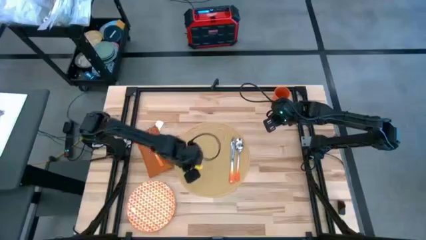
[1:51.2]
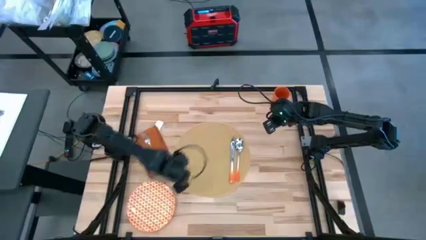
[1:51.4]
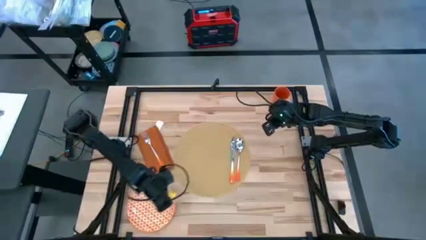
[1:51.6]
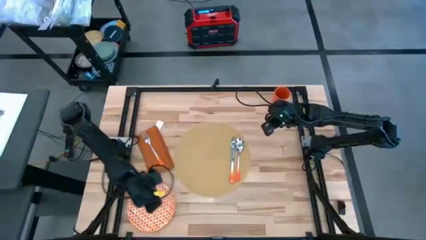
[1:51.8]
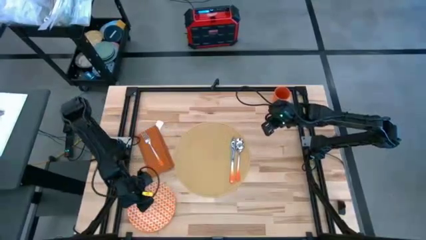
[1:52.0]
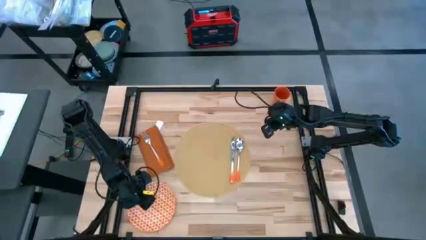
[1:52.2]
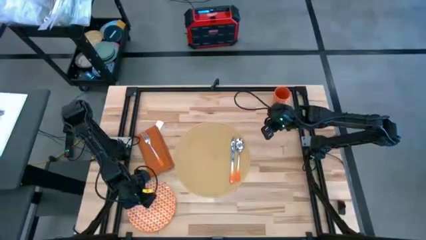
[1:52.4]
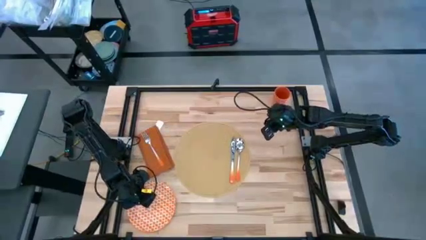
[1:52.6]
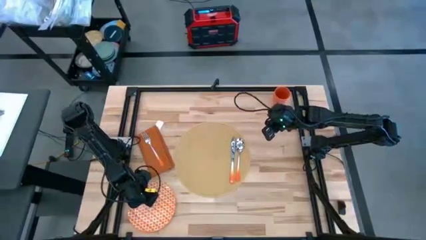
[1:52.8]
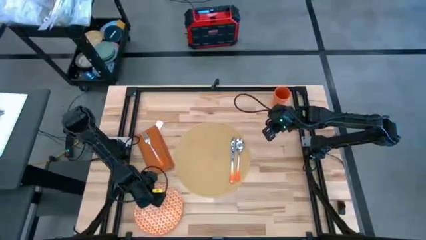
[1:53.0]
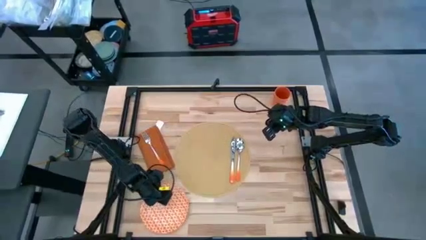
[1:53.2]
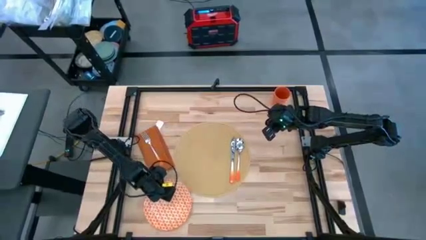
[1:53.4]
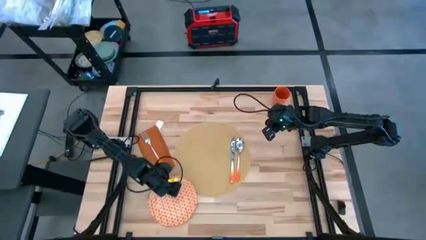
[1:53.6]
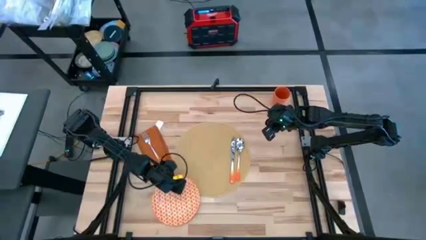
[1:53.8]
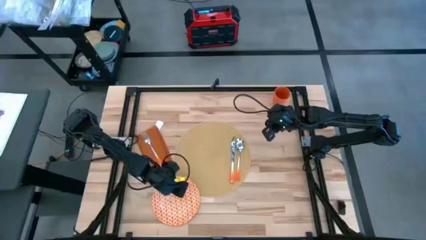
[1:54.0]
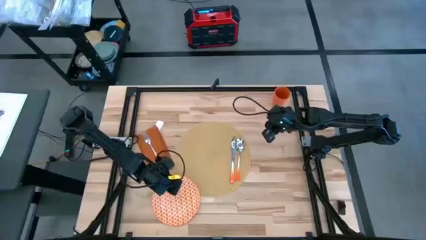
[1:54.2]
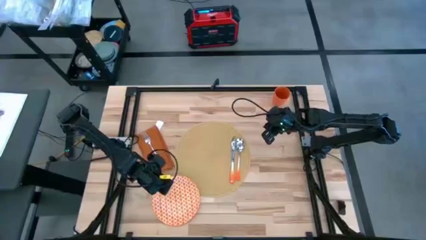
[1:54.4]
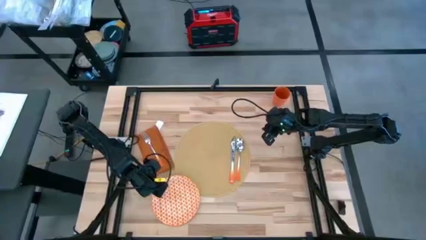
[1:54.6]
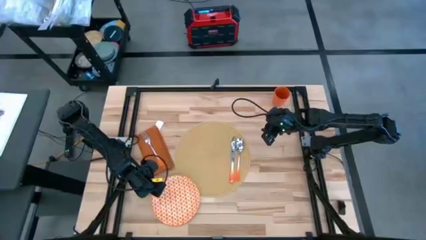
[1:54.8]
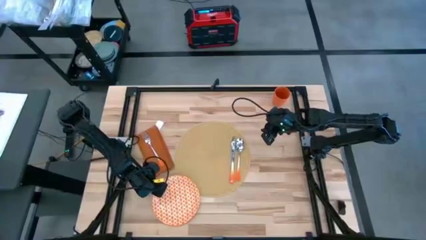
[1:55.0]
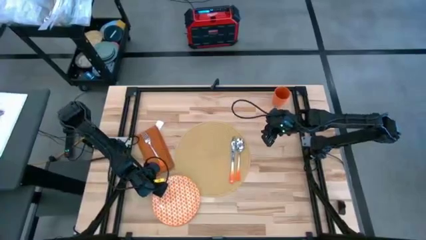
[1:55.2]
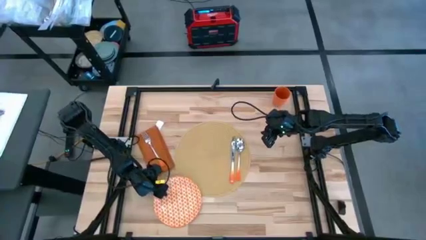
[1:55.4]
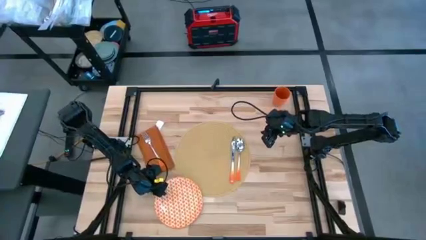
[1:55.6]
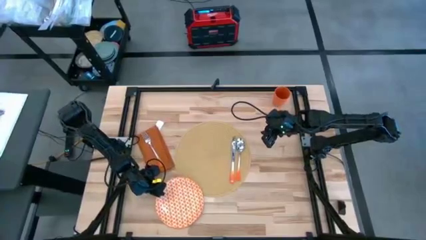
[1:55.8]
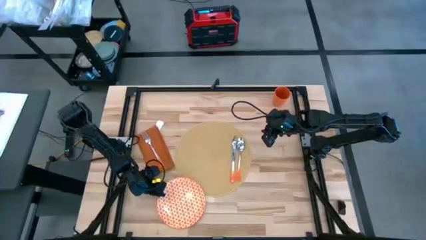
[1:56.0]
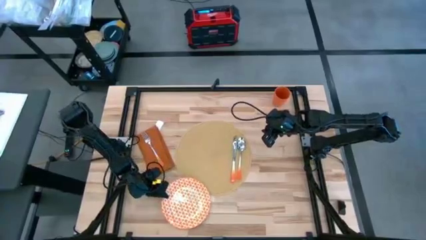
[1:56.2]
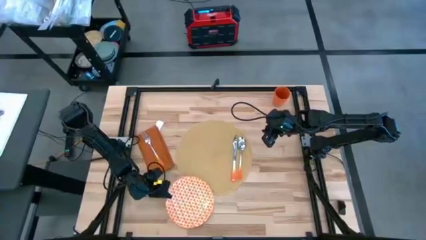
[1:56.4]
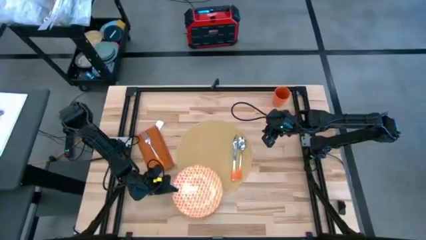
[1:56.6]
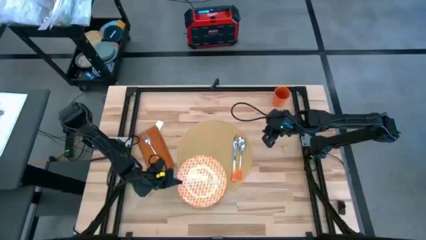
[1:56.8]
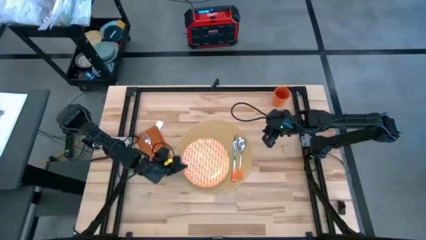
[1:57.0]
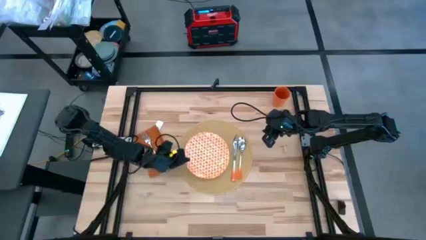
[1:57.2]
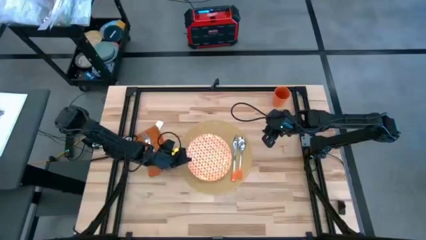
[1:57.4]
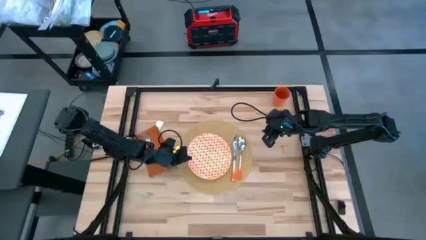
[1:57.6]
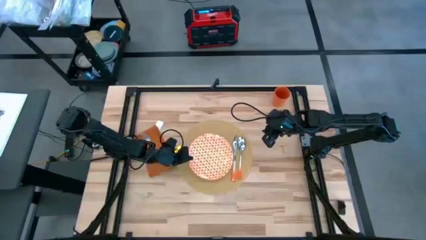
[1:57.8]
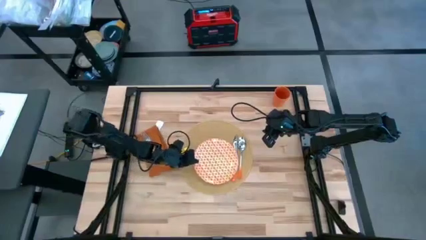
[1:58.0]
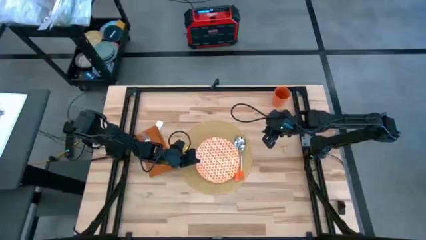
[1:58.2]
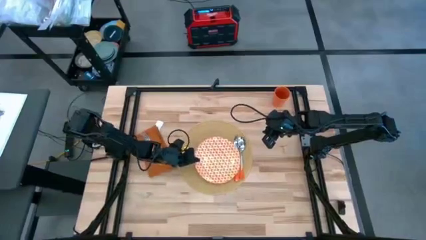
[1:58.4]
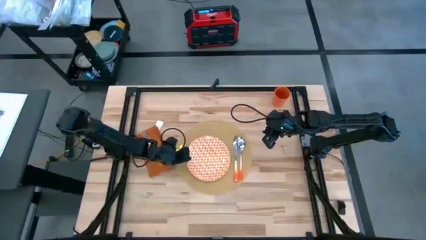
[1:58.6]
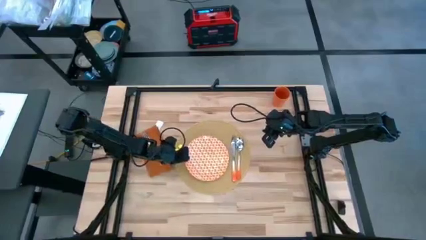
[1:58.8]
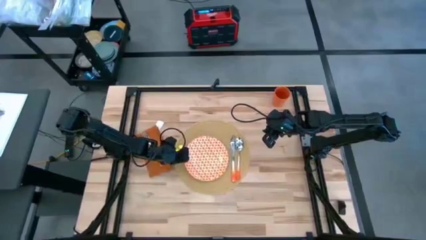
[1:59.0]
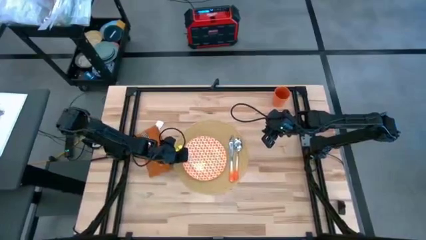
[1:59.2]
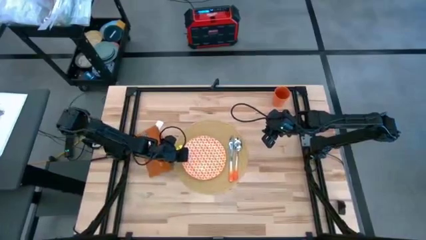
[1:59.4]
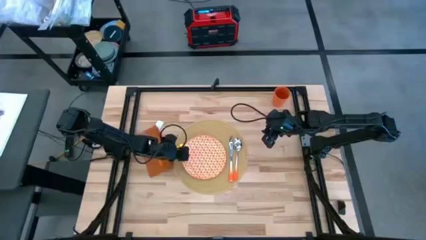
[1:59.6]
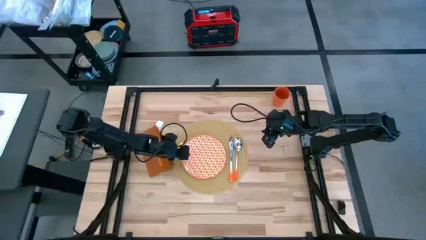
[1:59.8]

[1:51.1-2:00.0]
Task: Set table place
Put the orange plate on the placemat to the left of the table knife

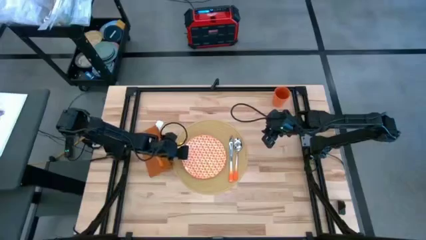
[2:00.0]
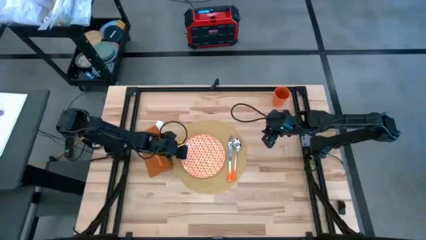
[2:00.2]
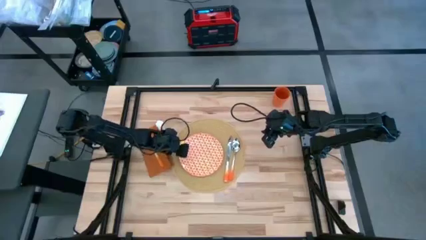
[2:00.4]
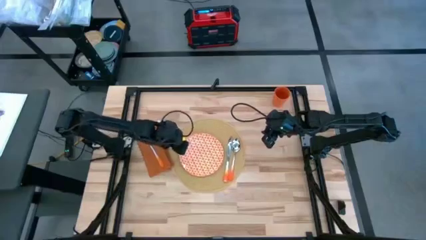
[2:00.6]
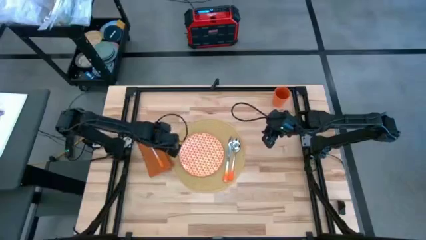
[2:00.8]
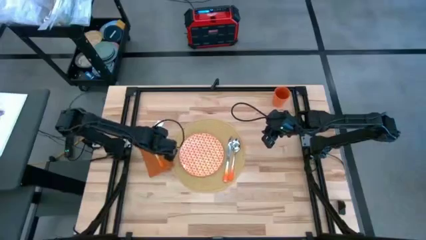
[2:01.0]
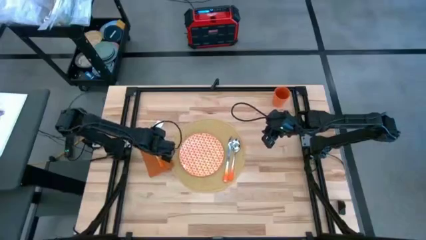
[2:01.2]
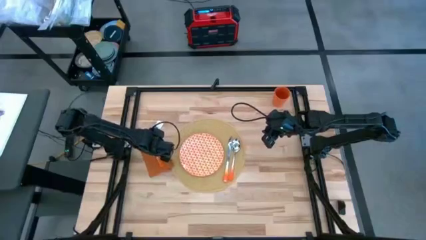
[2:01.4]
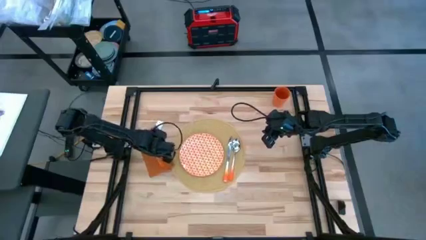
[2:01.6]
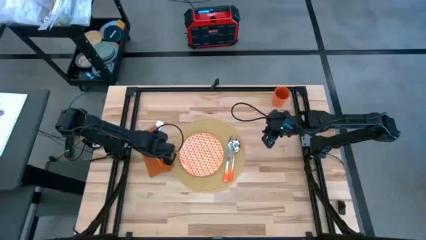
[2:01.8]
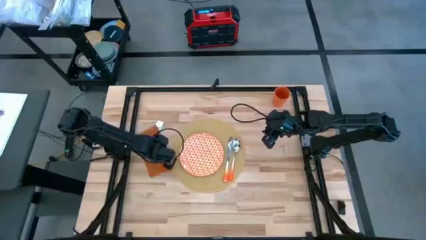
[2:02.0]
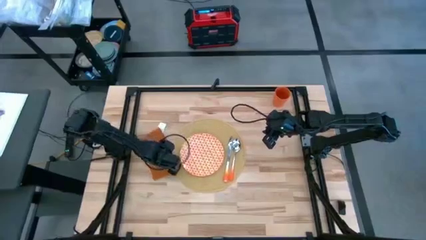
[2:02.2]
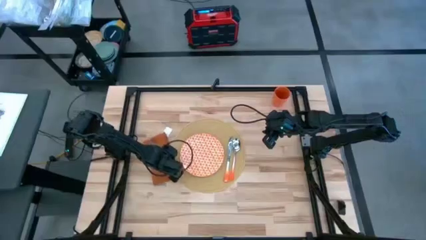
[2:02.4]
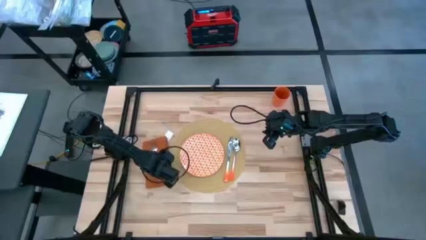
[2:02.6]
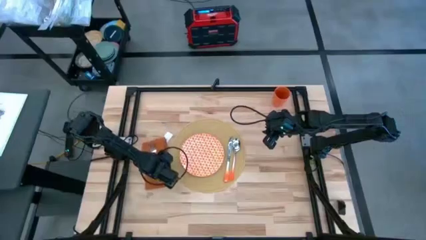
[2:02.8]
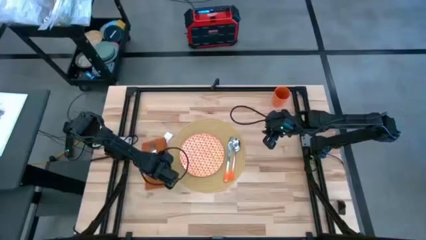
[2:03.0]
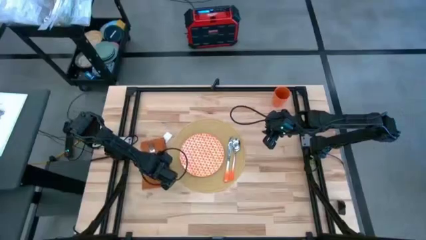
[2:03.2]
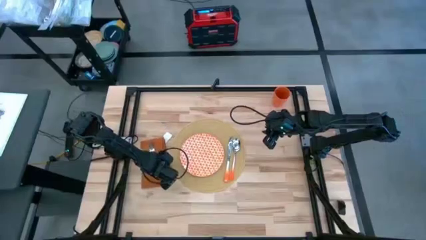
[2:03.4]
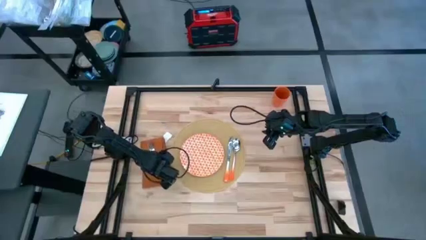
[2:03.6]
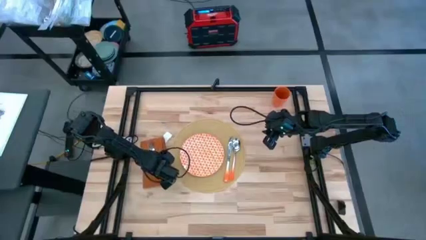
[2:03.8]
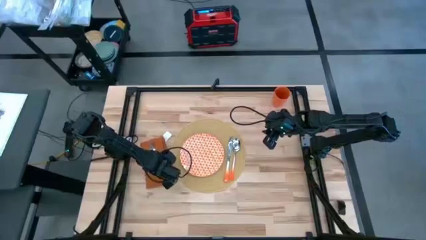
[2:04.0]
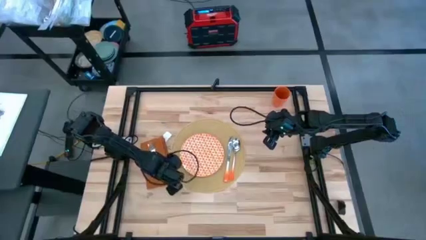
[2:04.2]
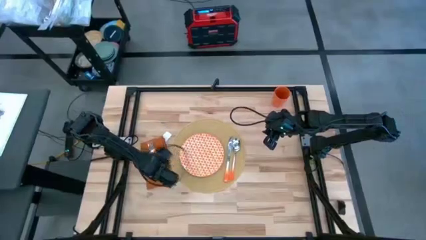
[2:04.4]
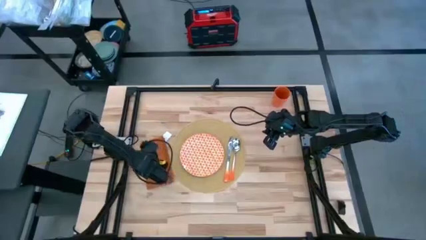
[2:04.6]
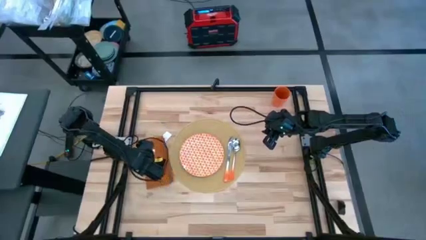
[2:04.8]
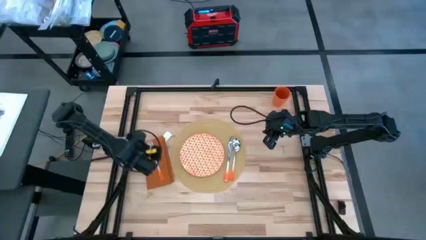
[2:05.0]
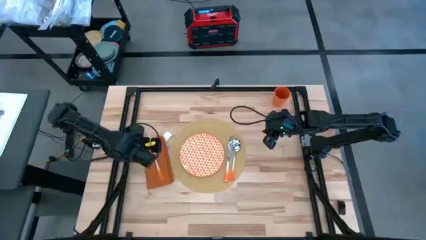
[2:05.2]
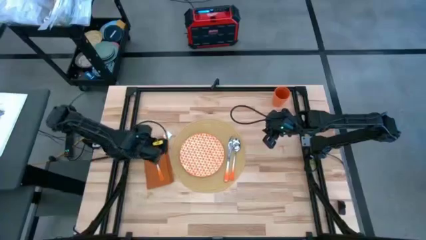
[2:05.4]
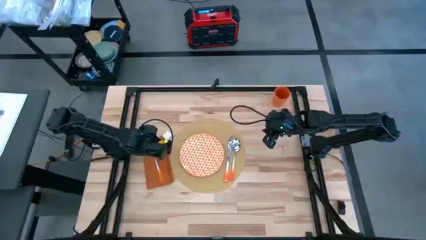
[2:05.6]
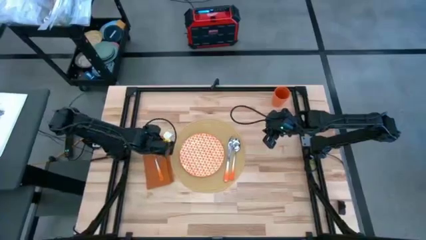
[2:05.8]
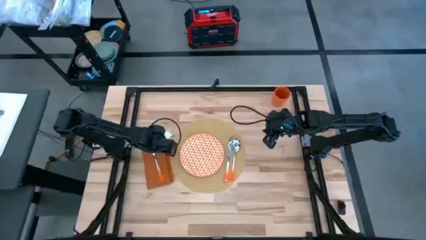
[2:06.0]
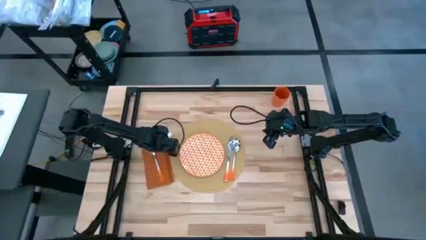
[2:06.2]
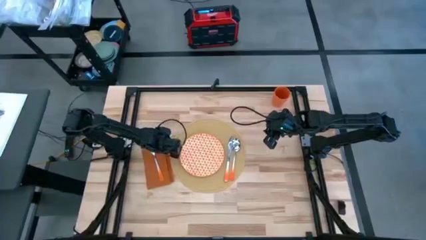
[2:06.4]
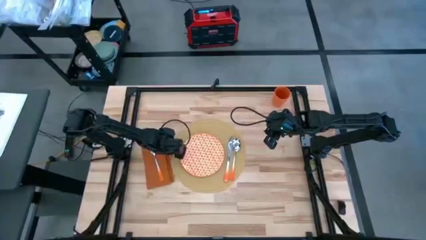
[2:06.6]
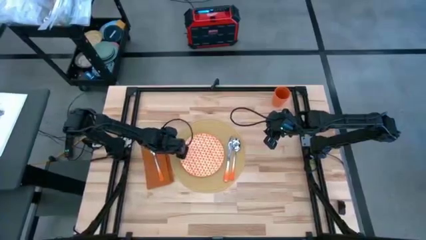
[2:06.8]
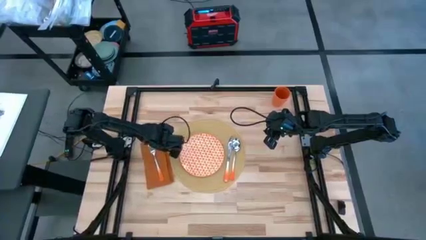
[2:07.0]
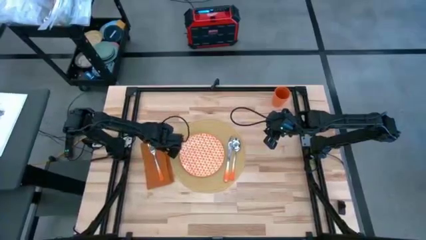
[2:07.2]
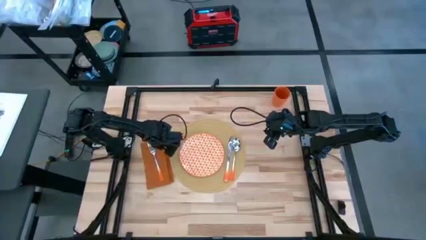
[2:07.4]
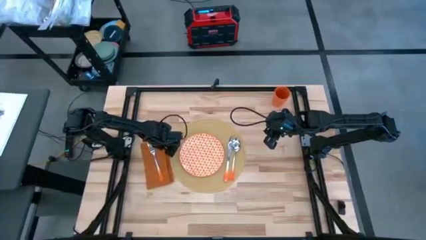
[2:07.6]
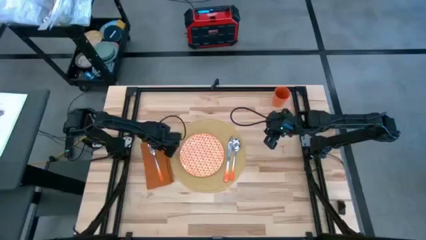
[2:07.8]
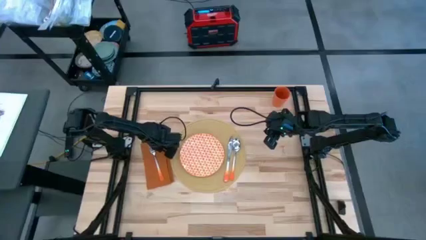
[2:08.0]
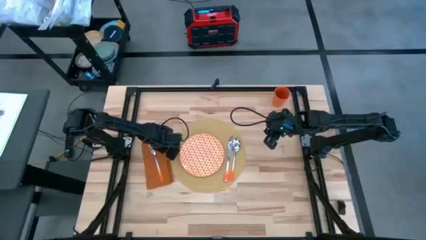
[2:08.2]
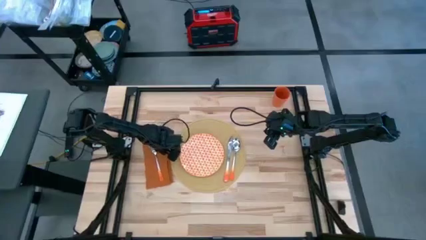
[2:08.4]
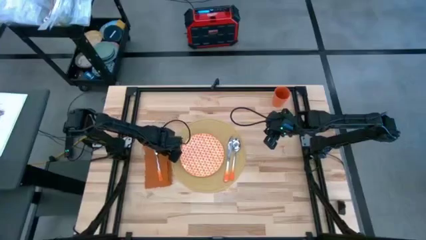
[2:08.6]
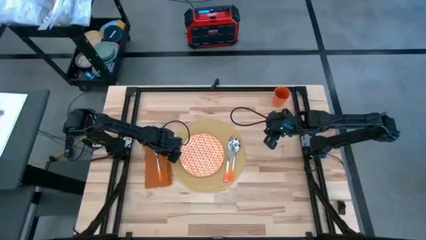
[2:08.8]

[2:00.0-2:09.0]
Adjust the table napkin
